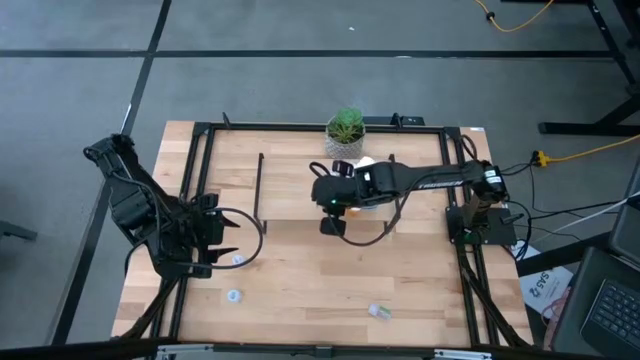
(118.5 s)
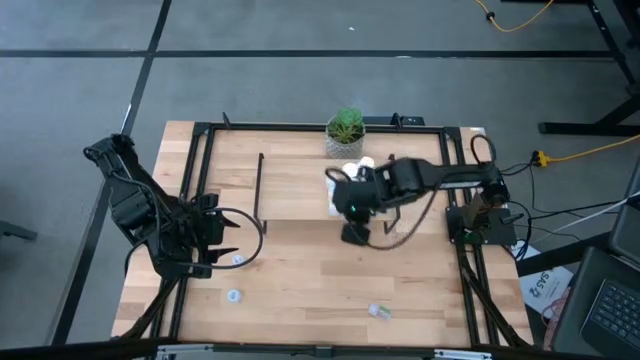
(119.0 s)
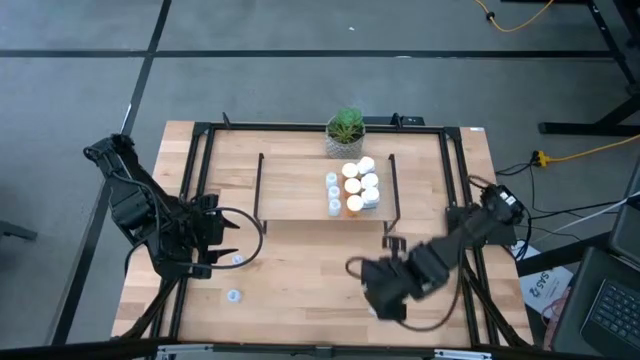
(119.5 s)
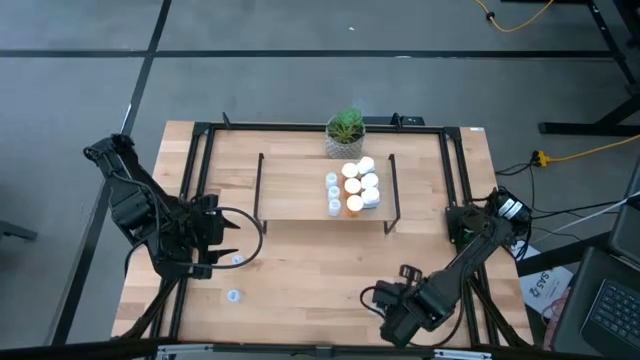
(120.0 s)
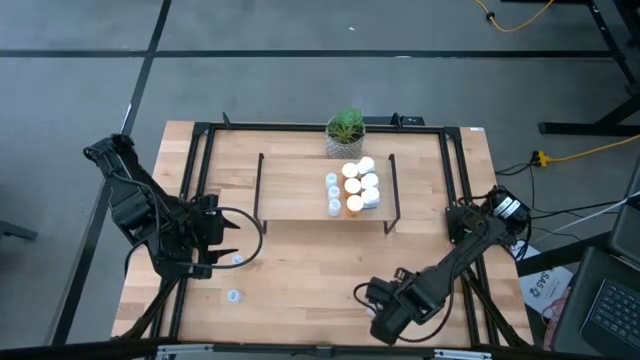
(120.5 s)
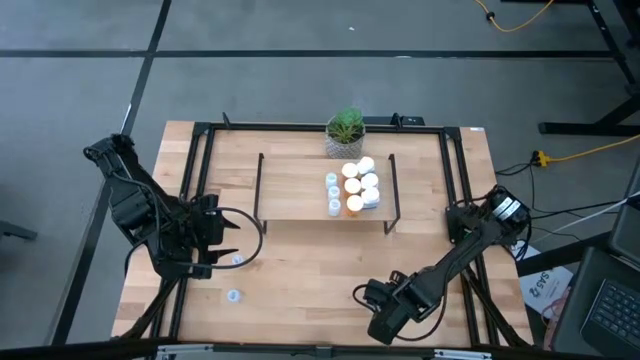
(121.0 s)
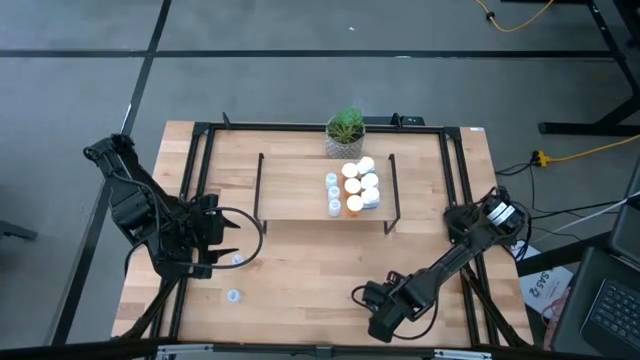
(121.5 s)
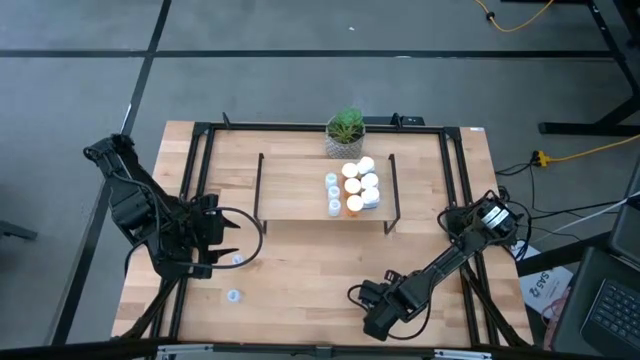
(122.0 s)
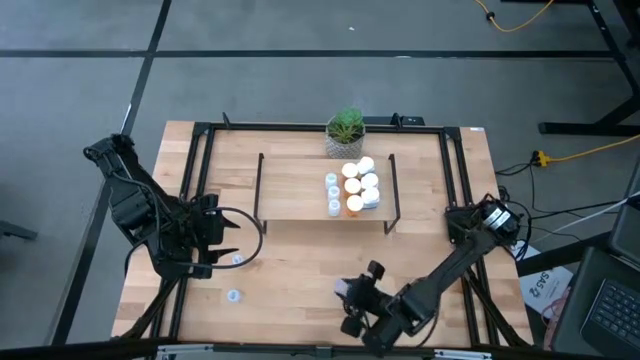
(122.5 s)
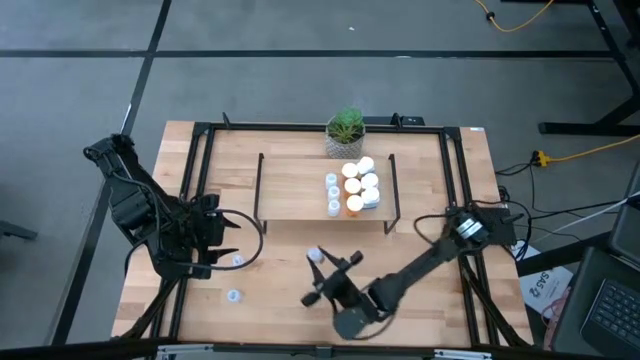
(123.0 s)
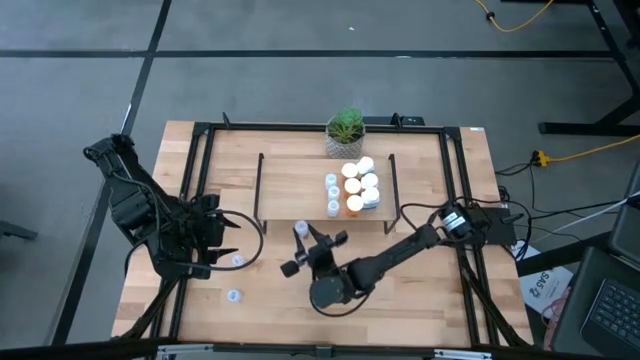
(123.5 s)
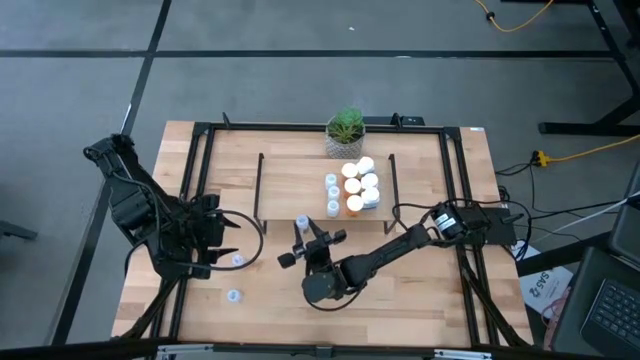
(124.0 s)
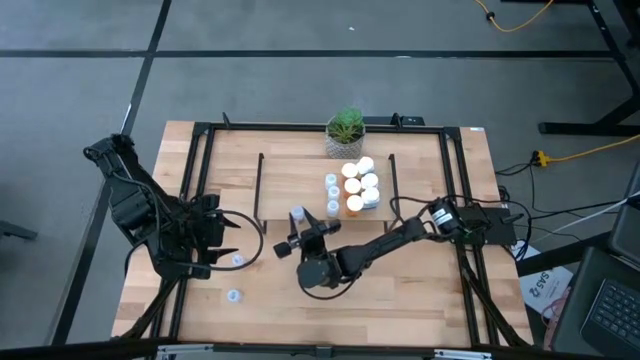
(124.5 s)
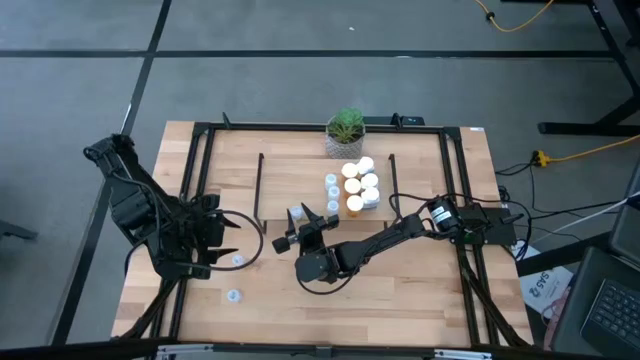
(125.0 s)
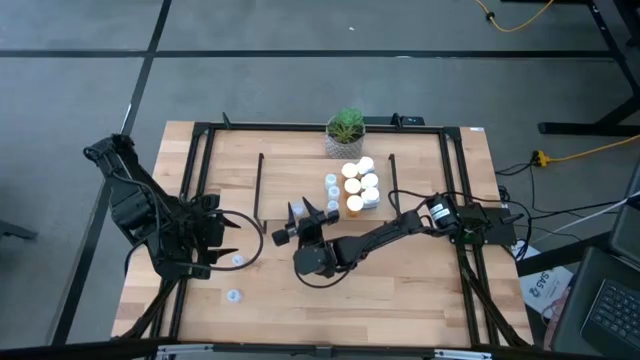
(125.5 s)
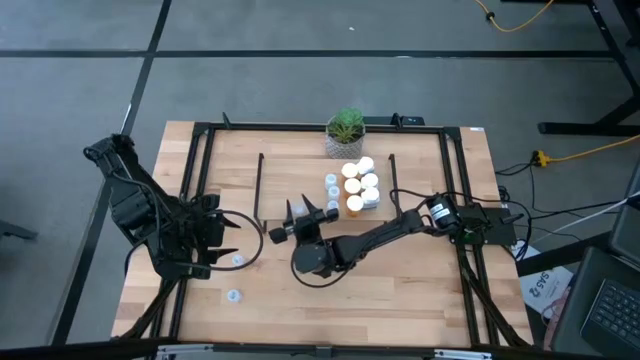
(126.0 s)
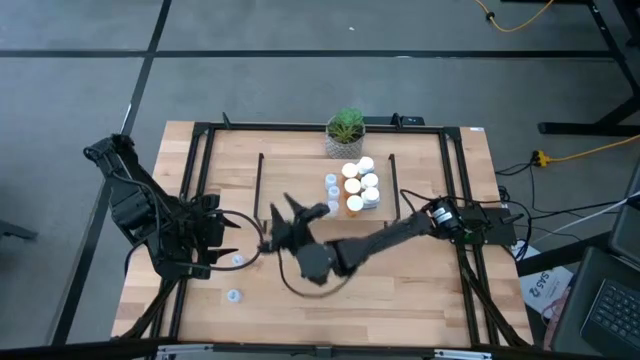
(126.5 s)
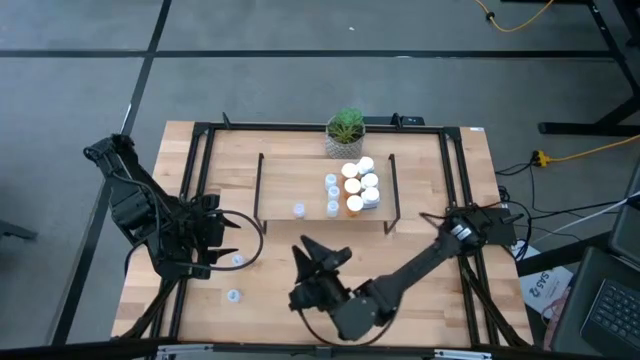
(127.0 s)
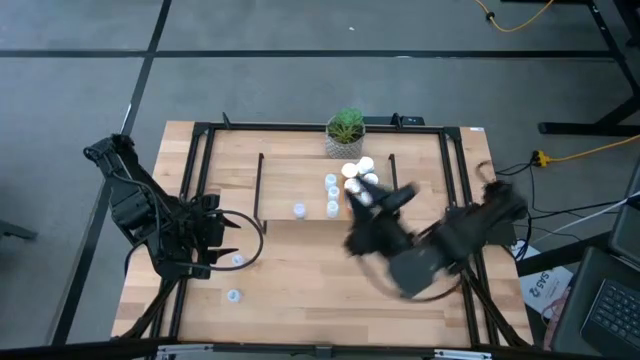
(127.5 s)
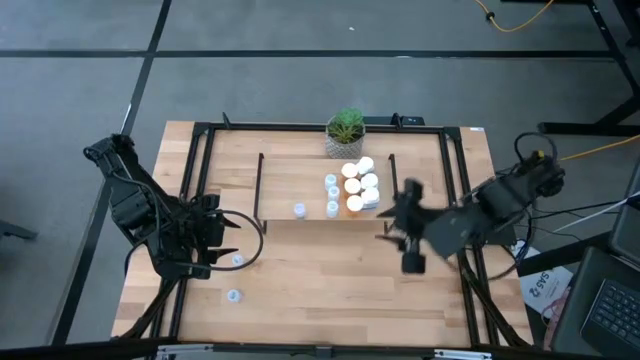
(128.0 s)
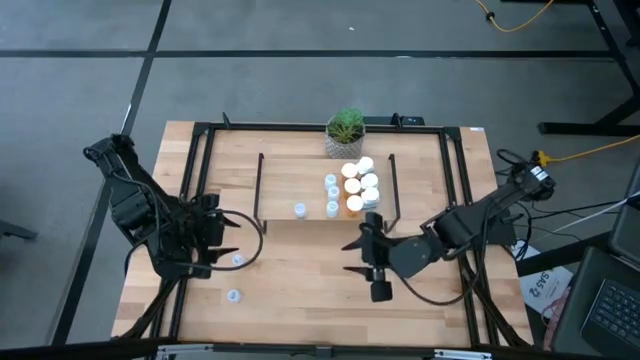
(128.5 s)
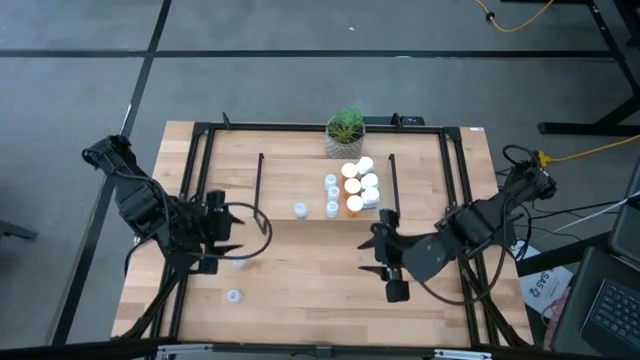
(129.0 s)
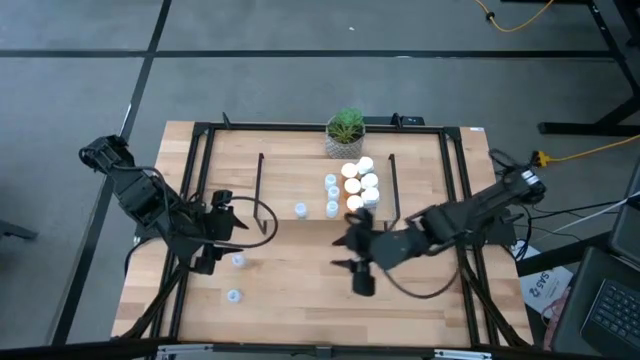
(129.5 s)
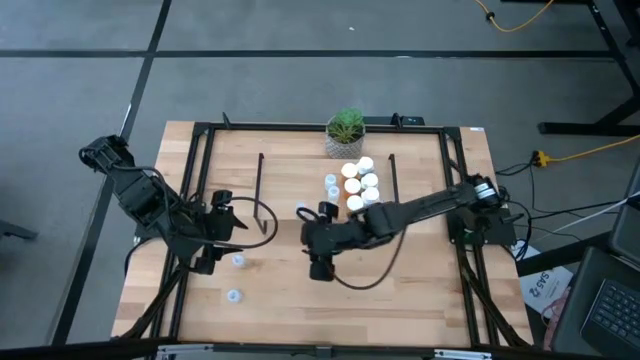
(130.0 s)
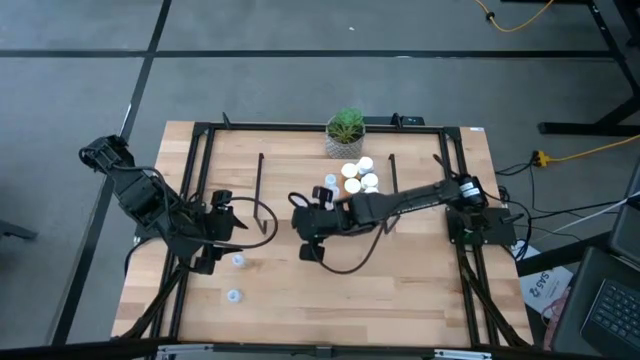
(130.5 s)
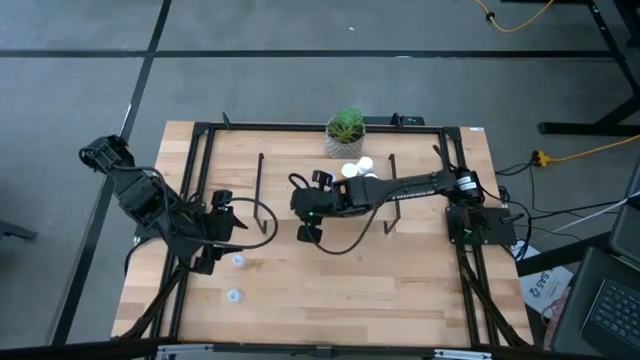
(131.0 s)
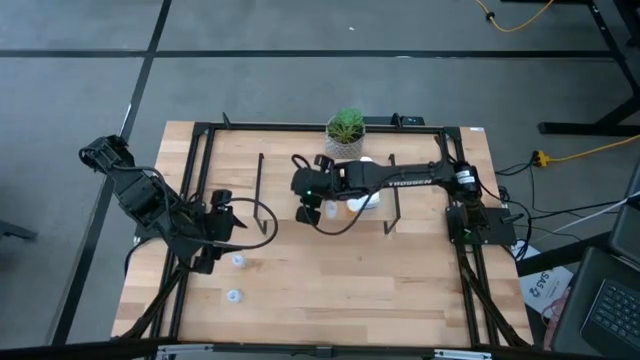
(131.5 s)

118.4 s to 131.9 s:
Task: Pick and place medicine bottles onto shelf by color
Put the bottom transparent pill bottle on the shelf

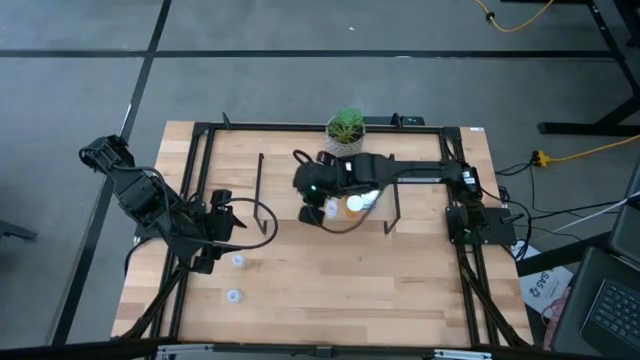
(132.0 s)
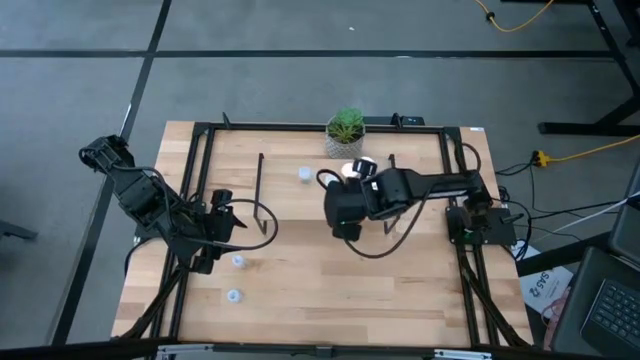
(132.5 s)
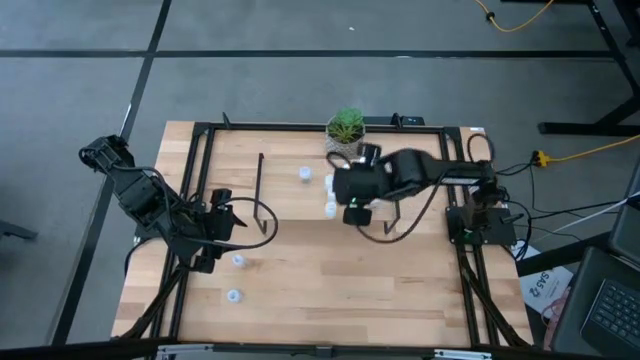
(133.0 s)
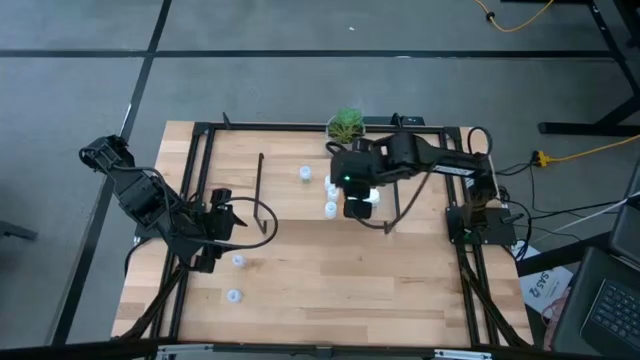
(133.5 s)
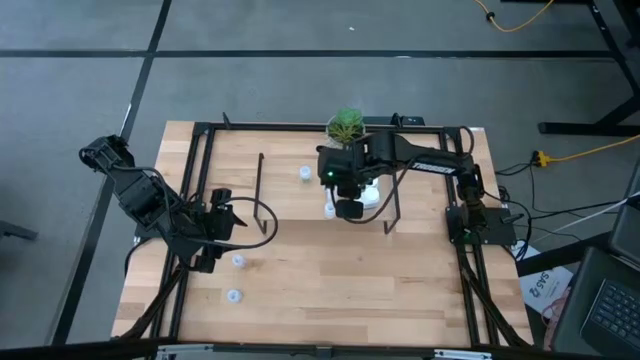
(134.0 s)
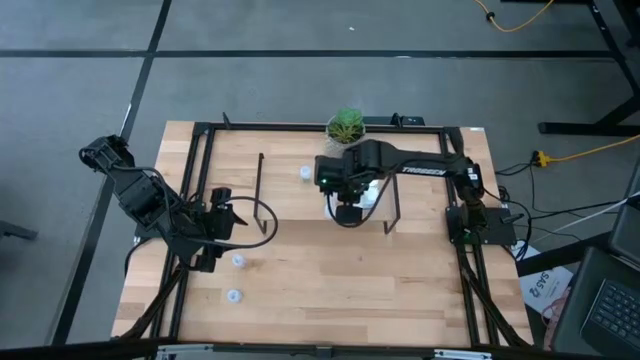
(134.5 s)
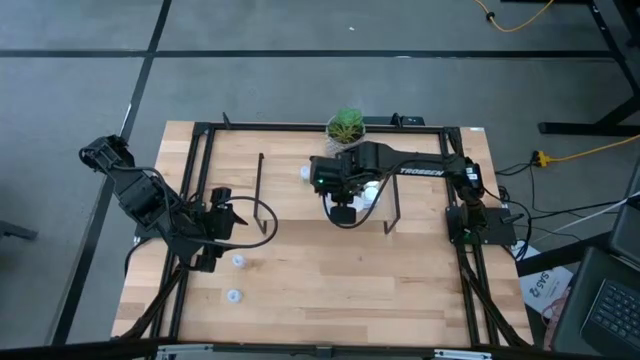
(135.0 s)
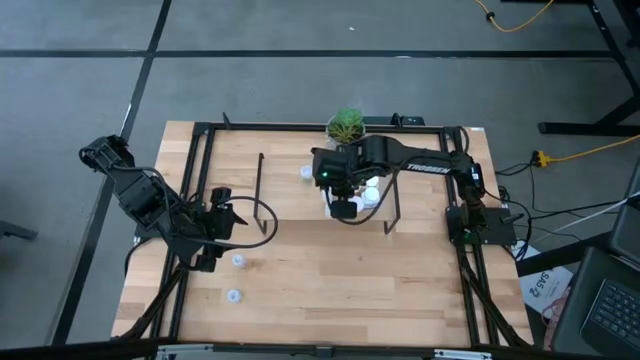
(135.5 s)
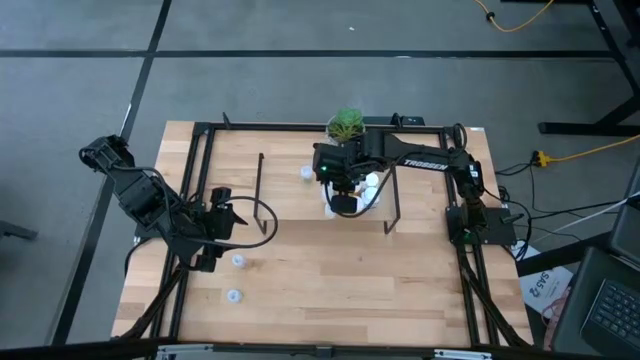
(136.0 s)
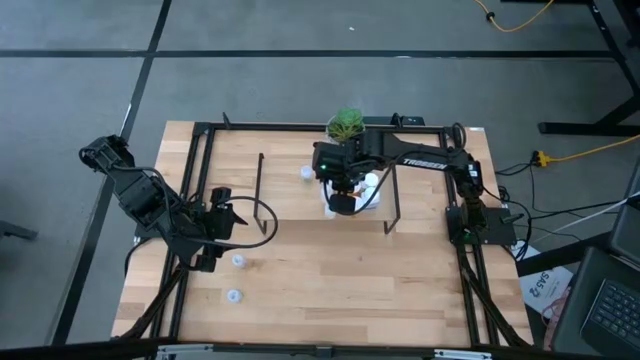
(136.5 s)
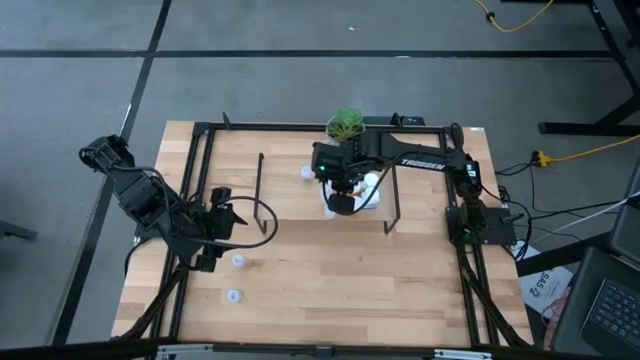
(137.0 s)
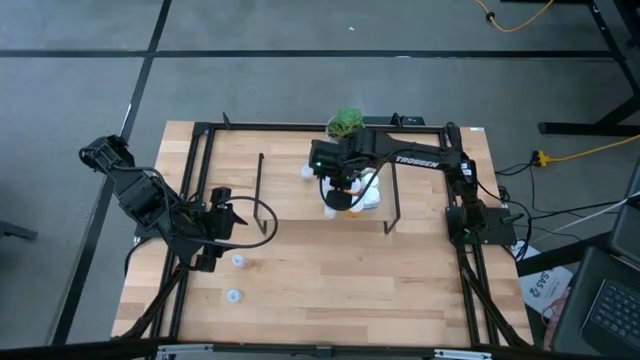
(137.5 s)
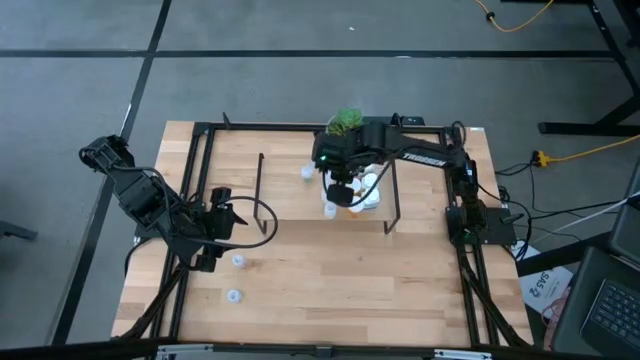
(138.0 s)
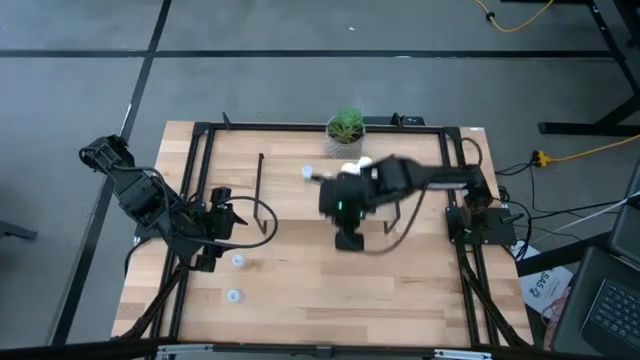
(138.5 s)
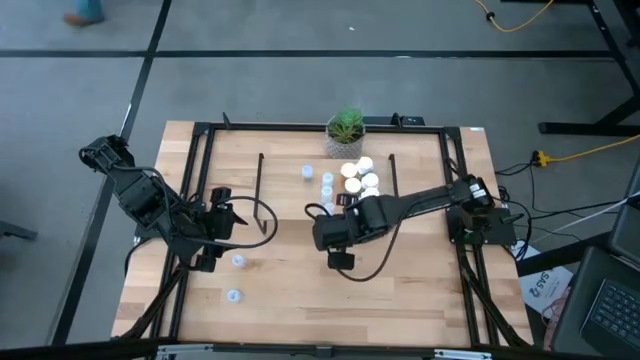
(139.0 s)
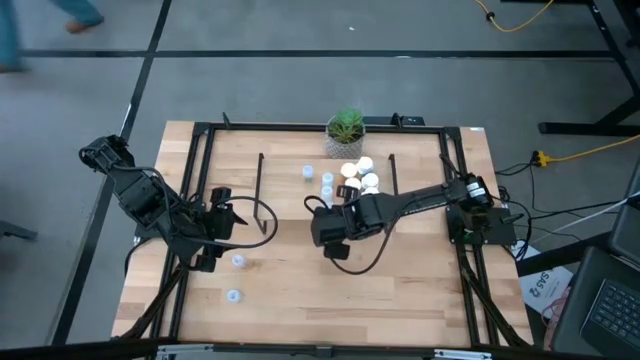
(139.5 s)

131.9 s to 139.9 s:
Adjust the transparent pill bottles on the shelf
